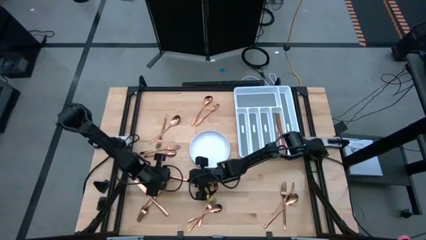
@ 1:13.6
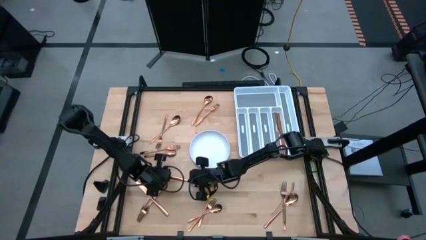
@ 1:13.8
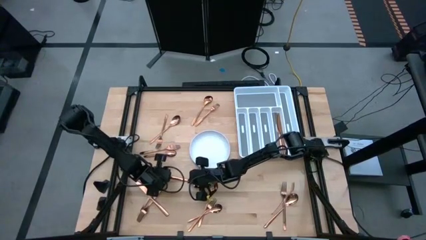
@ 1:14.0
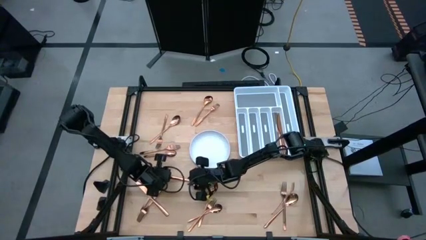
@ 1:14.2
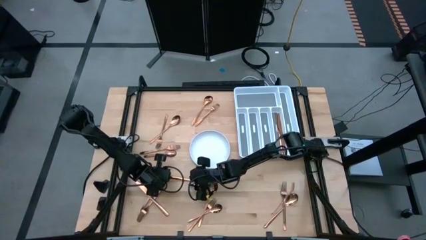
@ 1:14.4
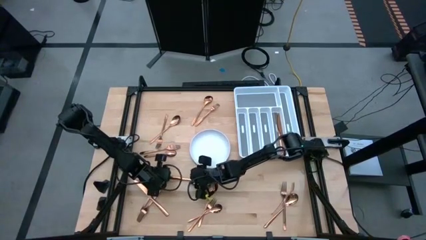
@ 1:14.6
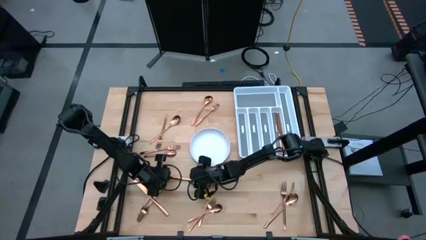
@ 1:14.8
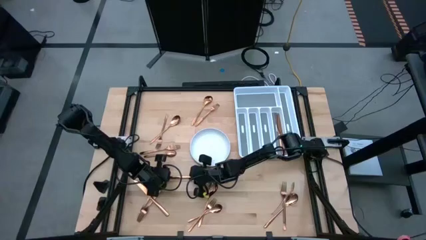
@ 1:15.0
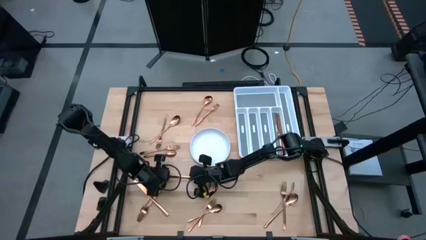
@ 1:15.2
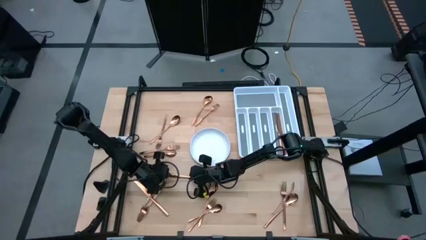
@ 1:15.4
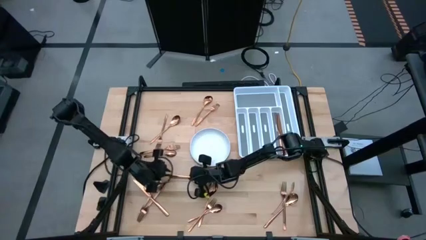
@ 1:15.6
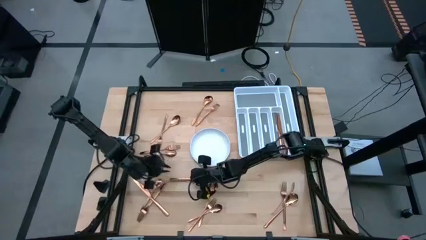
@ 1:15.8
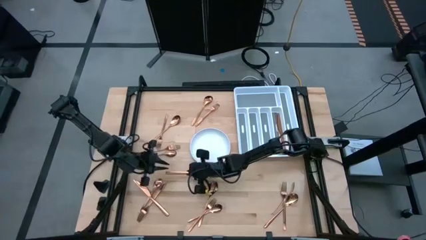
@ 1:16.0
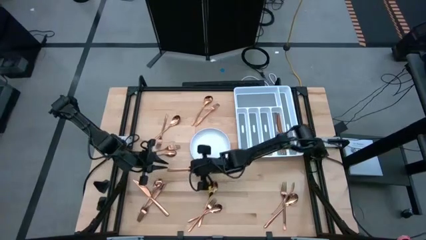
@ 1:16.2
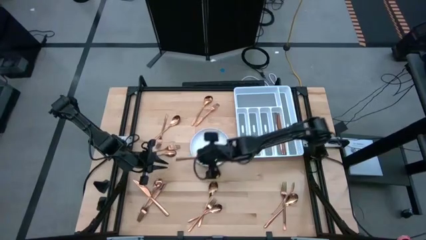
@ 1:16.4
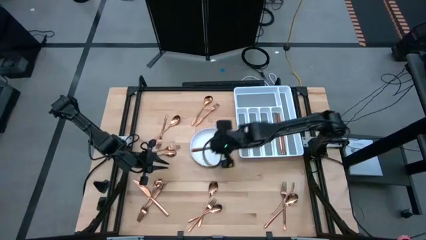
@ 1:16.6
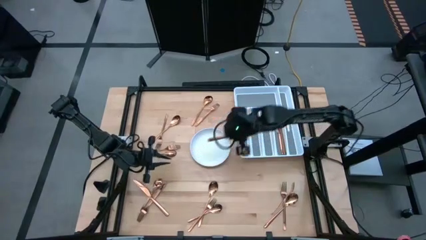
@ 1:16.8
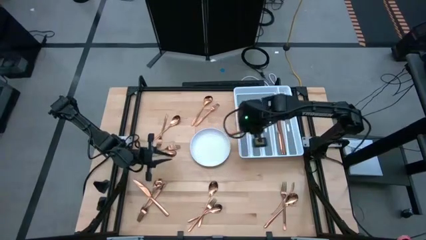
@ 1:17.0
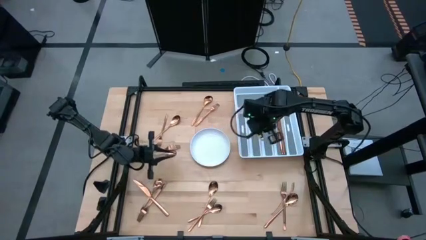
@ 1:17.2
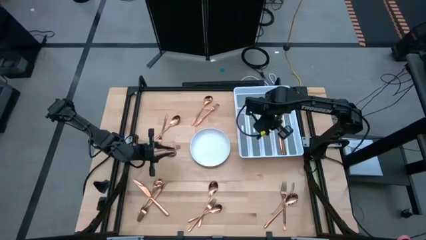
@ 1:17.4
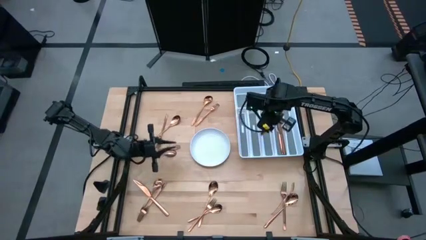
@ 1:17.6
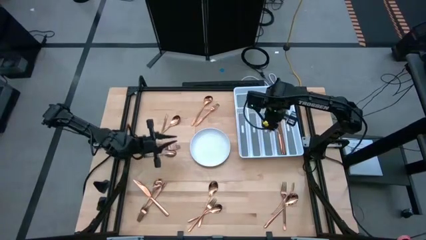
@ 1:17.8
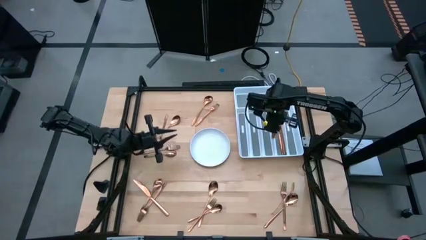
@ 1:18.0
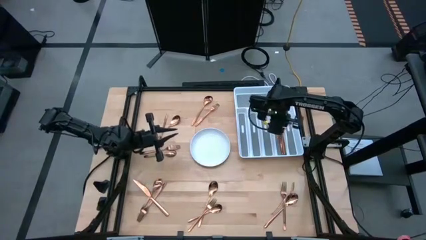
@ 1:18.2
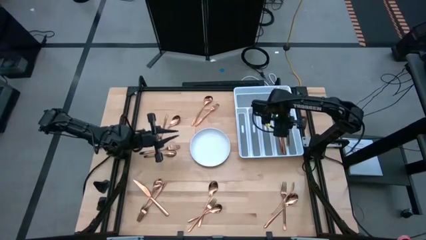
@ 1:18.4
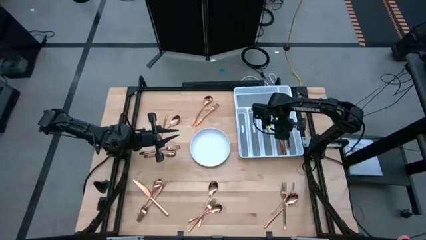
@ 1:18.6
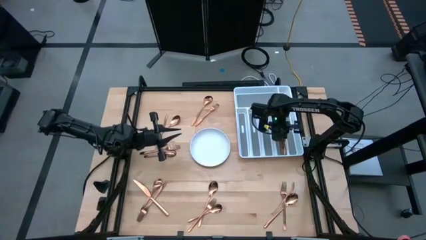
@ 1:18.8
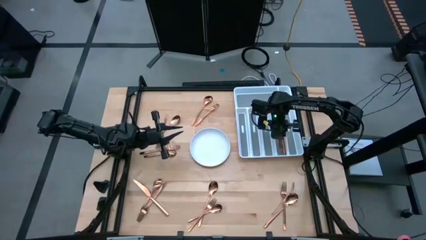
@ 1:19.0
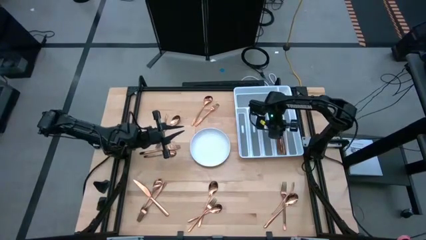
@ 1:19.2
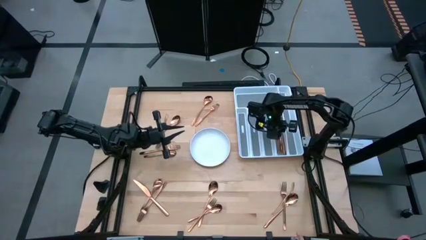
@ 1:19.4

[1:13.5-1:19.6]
Task: Sort silverware
Put the knife in the silverware tray

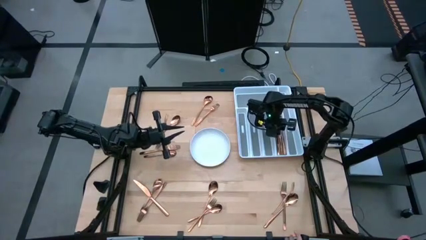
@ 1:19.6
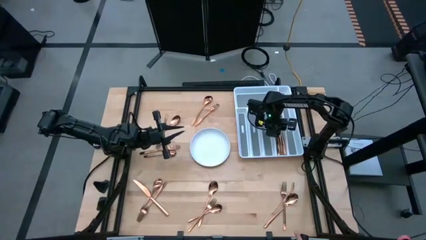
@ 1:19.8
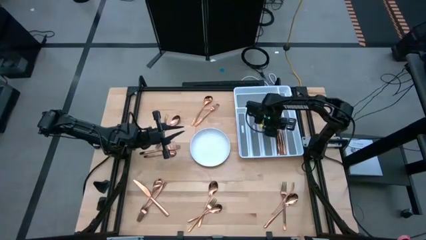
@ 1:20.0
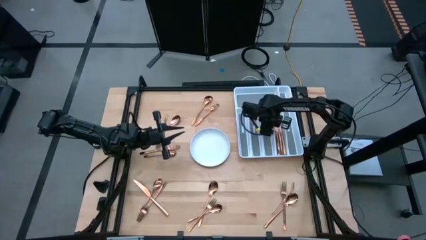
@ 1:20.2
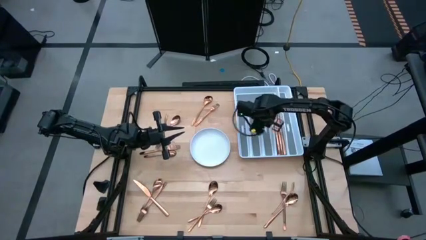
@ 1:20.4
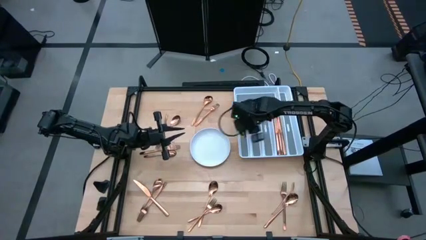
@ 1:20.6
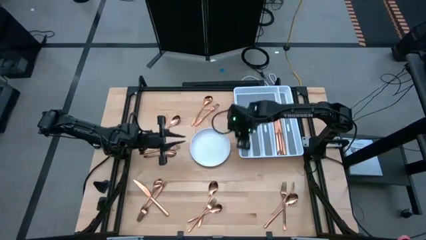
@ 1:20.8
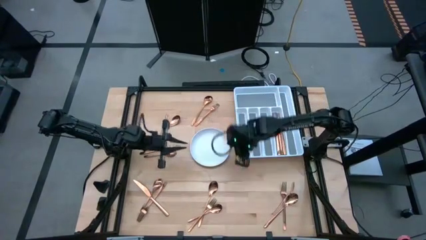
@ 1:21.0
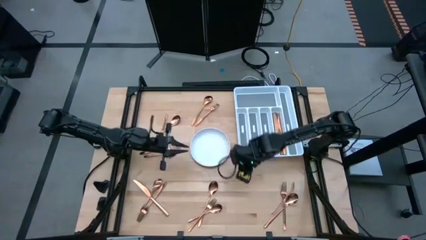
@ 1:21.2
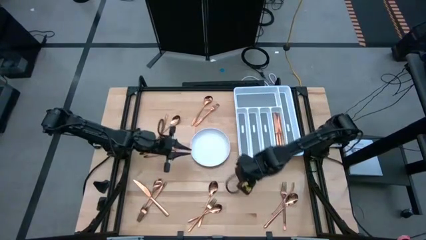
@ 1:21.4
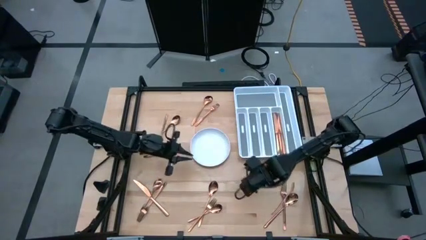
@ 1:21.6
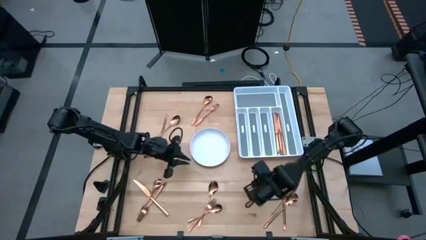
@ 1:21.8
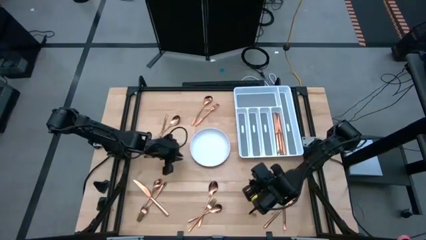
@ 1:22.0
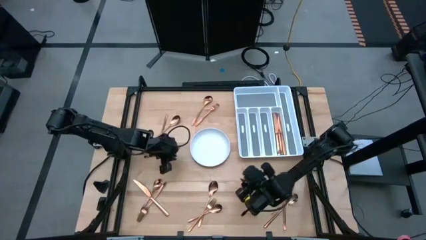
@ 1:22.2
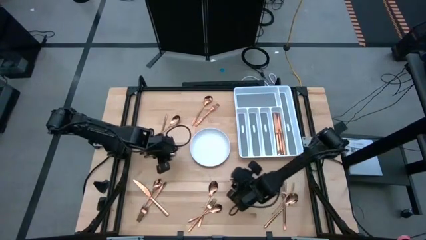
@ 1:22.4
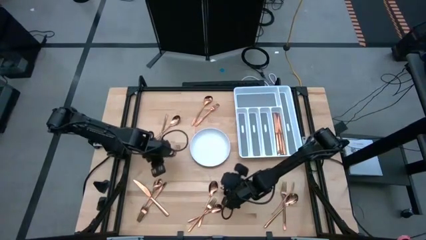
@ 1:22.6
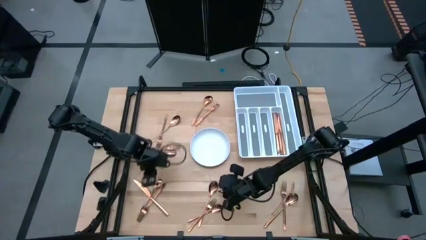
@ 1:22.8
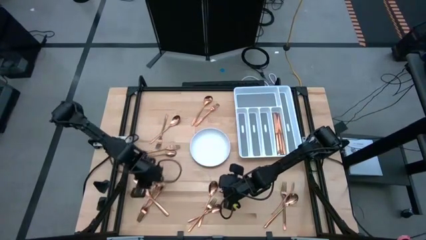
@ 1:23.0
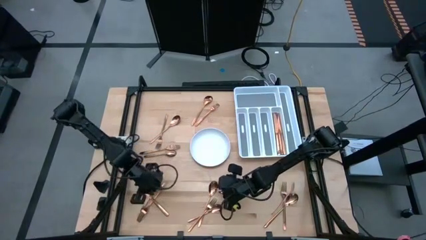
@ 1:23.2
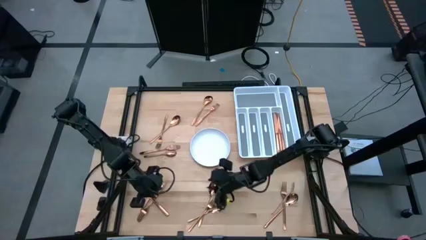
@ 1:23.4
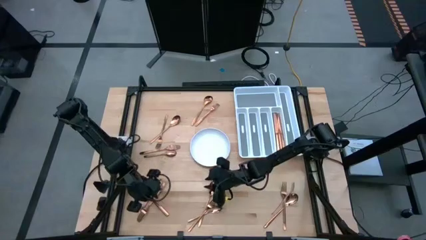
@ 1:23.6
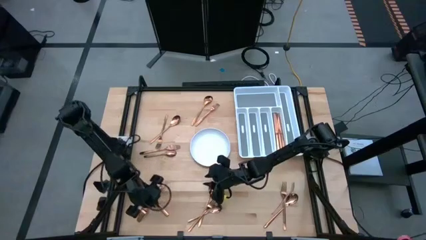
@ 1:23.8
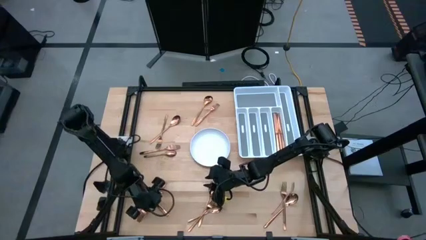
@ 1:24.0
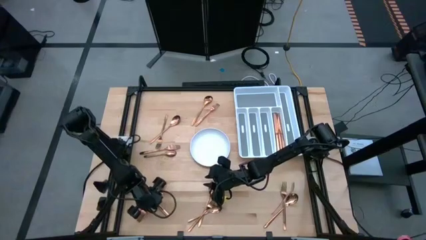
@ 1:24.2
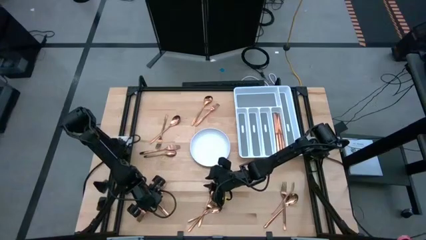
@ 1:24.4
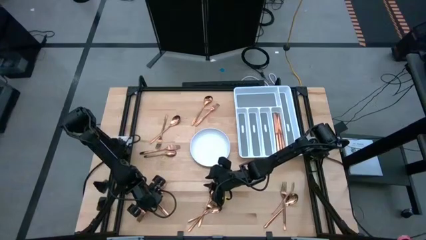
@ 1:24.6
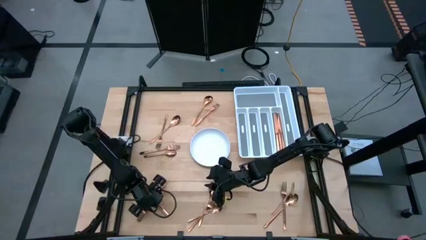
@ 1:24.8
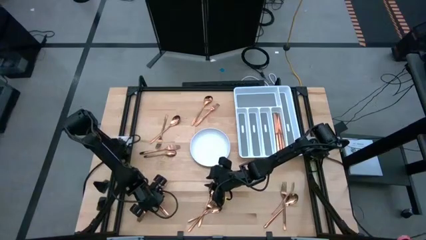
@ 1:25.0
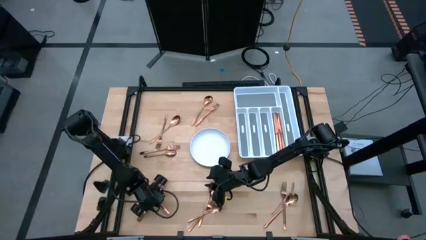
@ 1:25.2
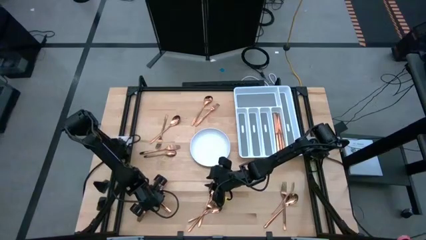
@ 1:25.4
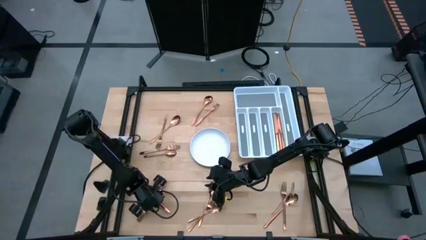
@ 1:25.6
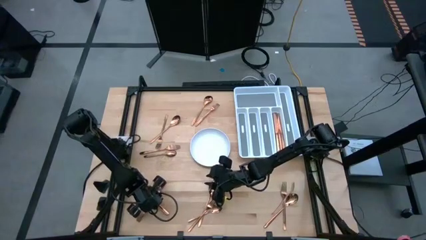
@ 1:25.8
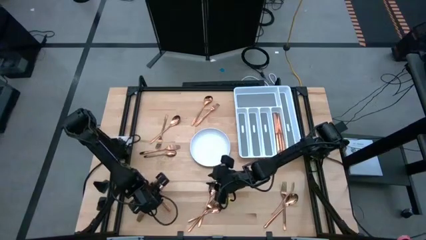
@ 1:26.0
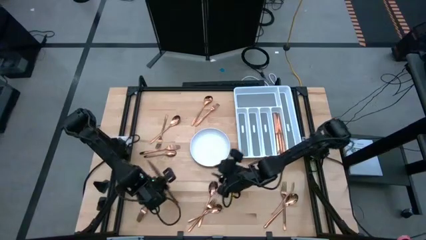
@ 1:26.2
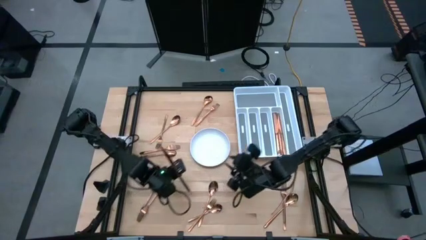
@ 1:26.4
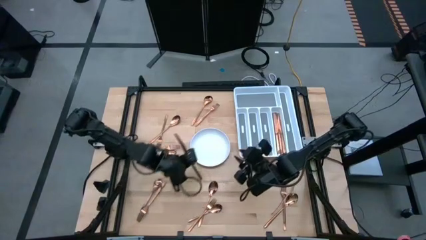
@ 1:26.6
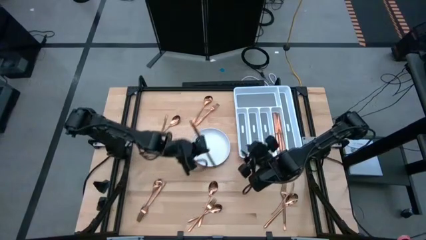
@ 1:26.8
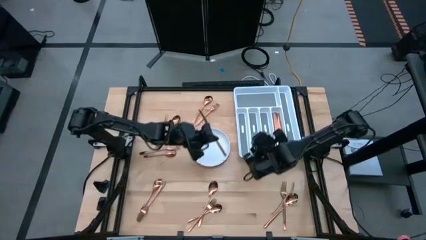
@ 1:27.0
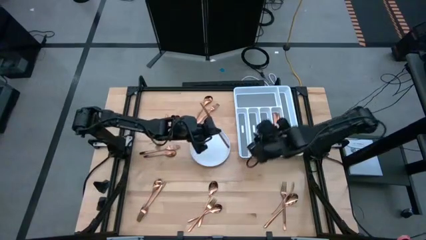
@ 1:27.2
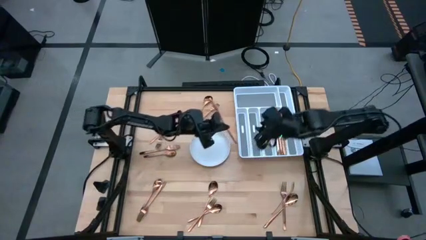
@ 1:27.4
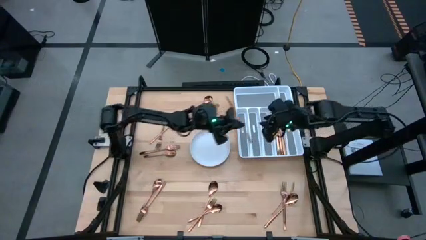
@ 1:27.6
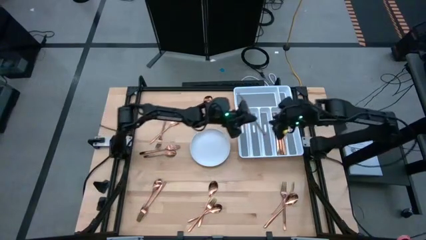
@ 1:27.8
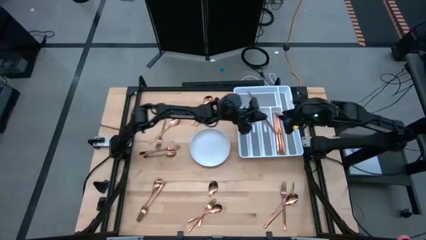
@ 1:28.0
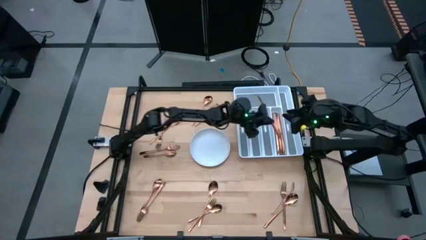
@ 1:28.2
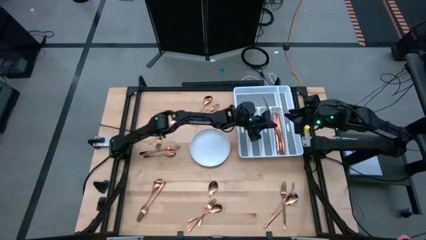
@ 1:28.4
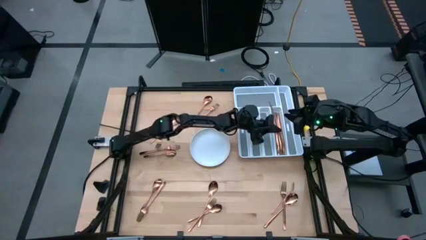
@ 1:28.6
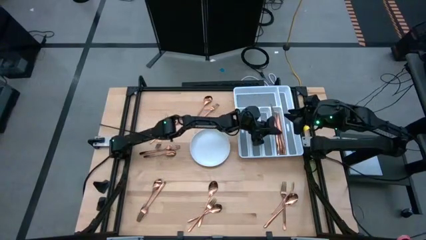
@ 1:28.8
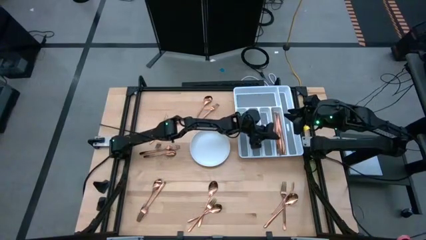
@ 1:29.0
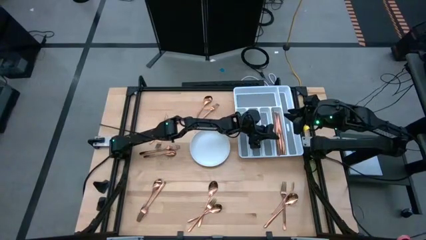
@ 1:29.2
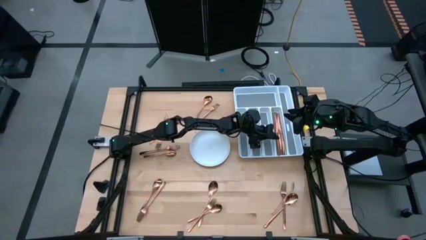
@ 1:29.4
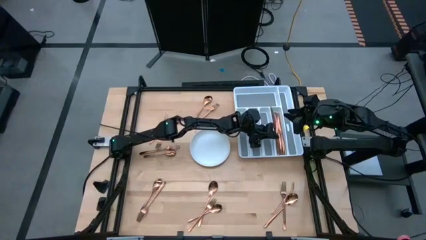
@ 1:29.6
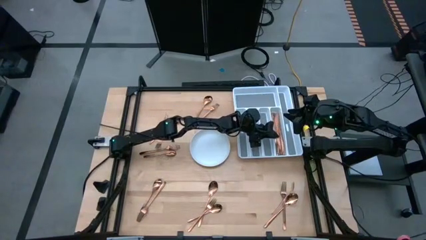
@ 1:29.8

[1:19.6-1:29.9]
Put the knife in the silverware tray
